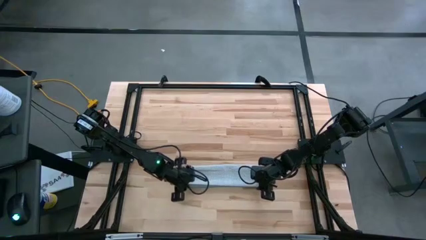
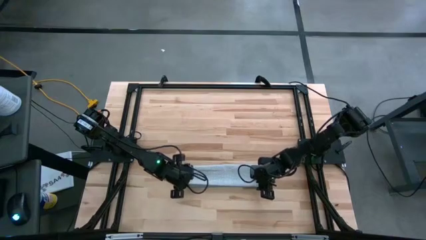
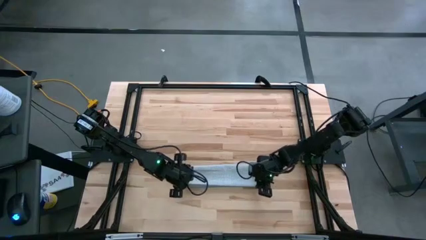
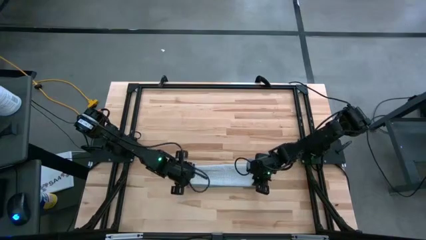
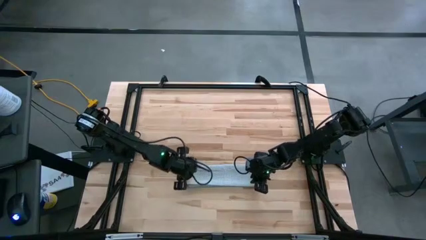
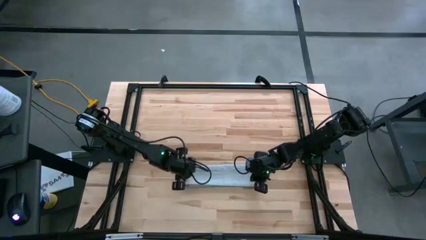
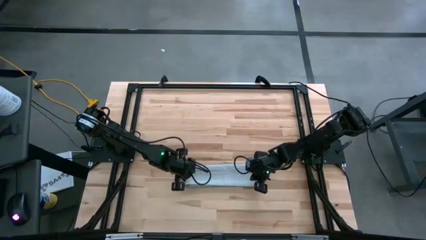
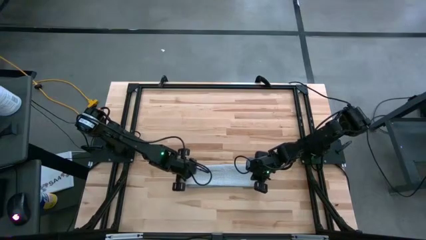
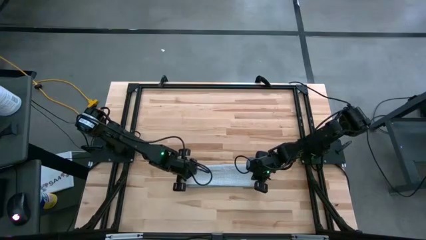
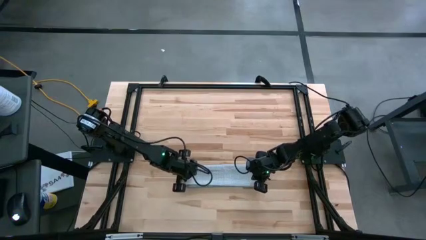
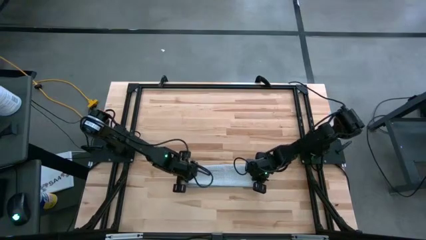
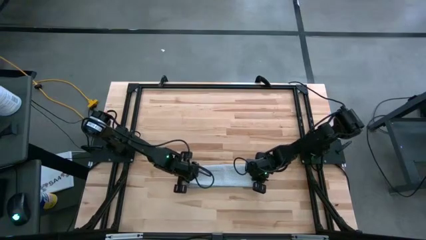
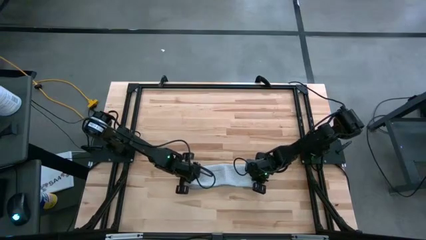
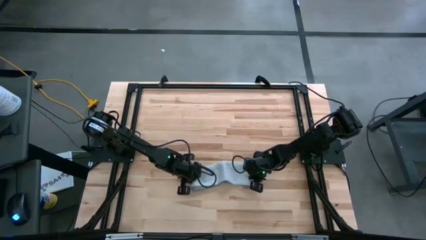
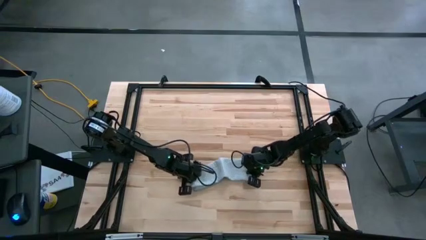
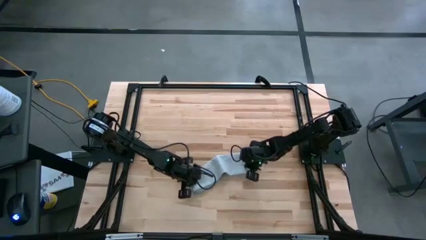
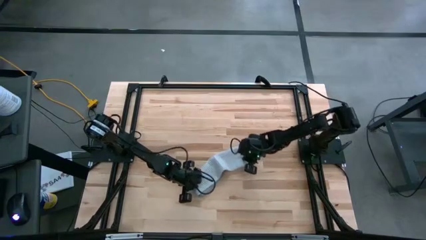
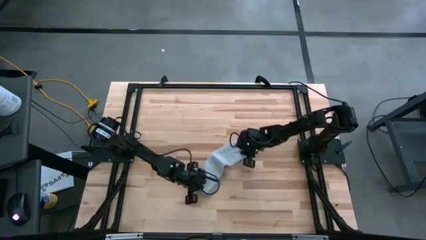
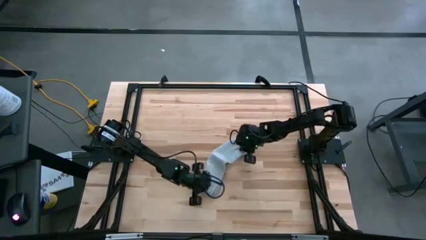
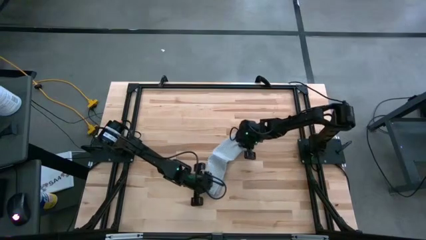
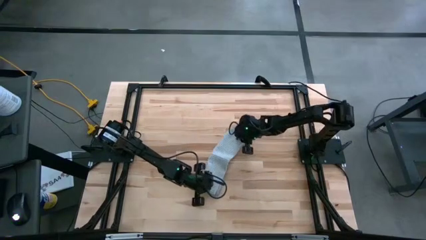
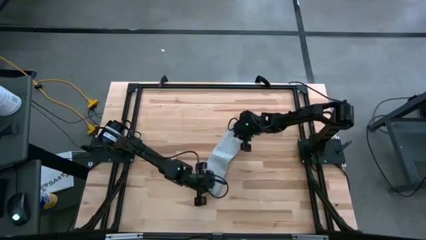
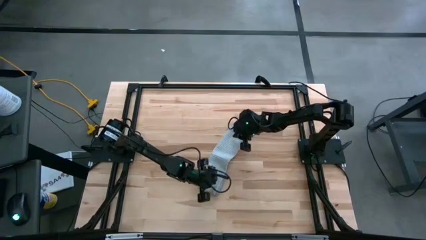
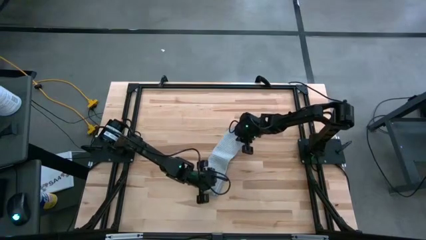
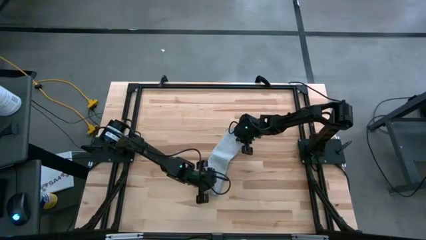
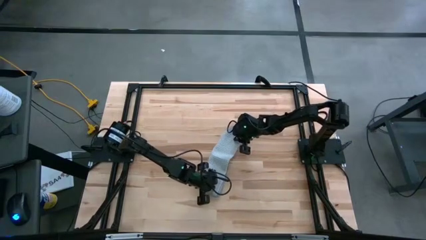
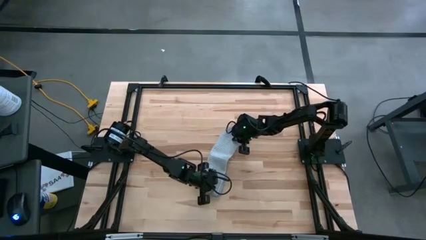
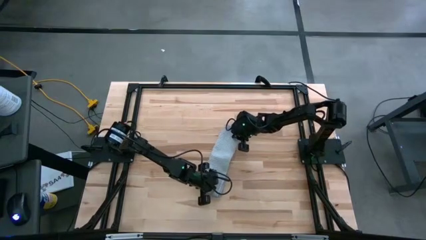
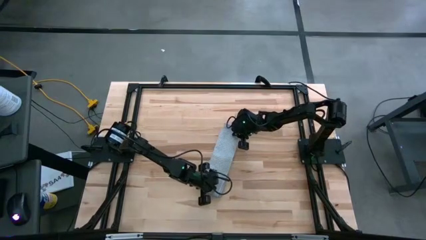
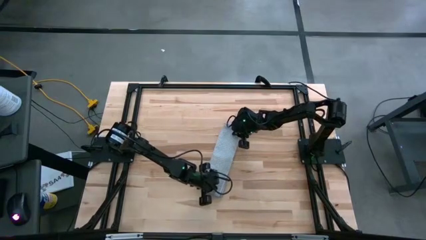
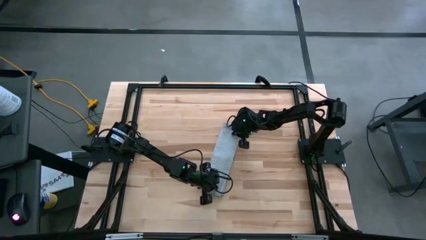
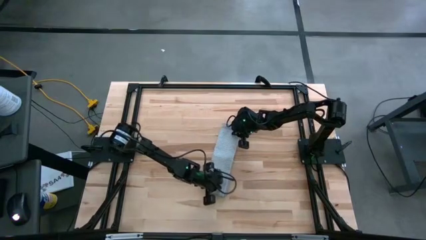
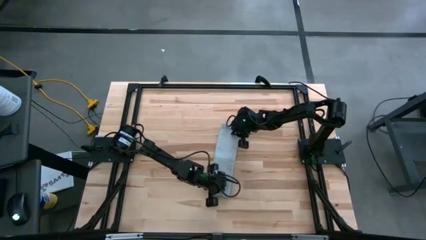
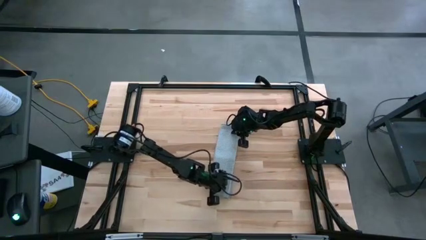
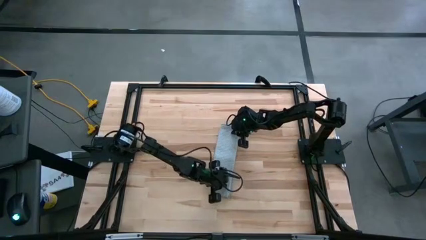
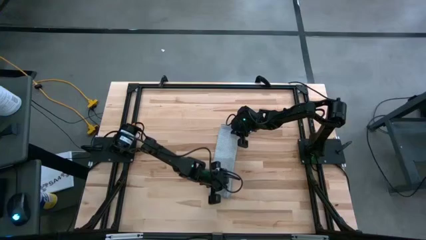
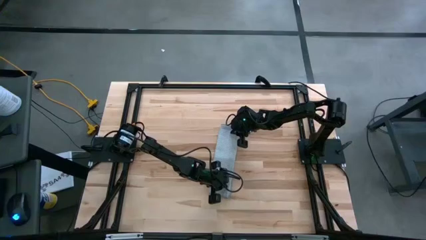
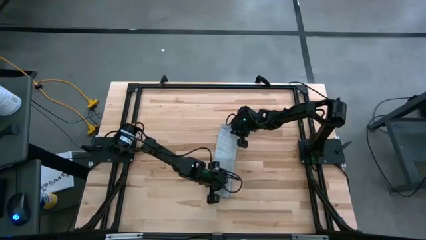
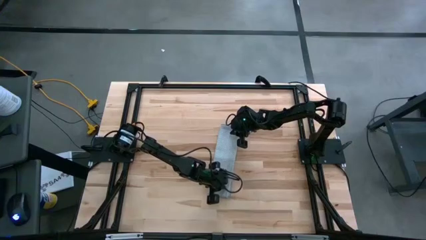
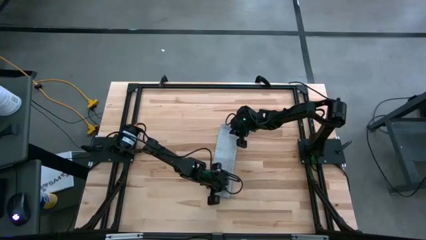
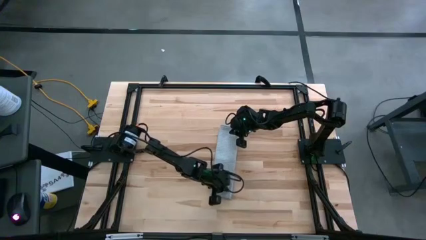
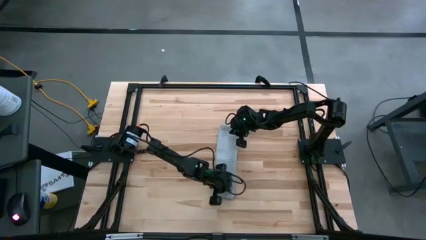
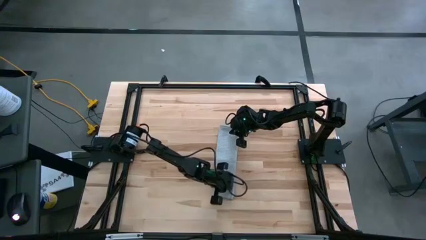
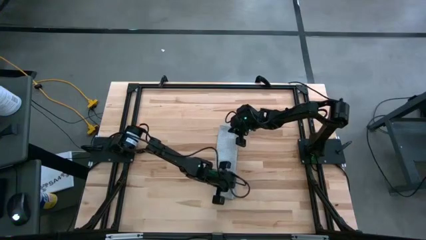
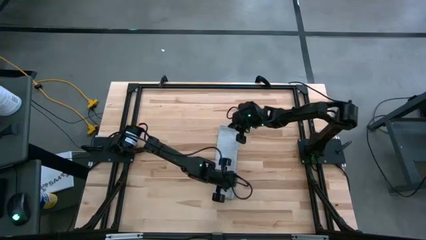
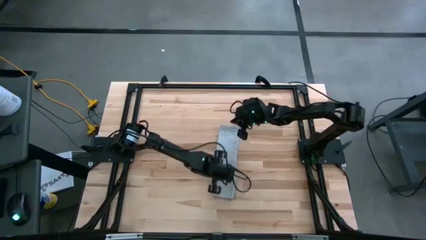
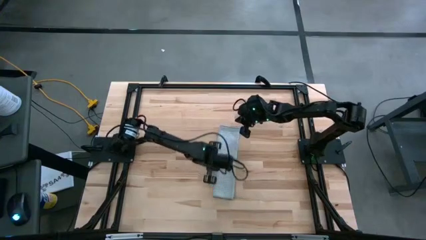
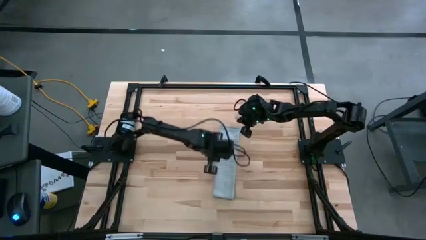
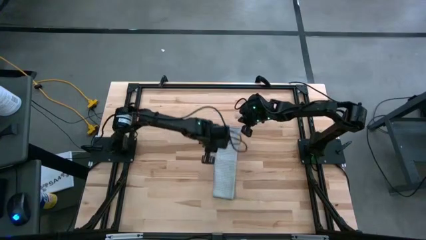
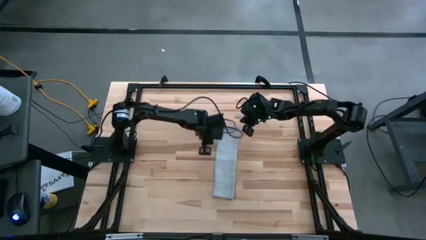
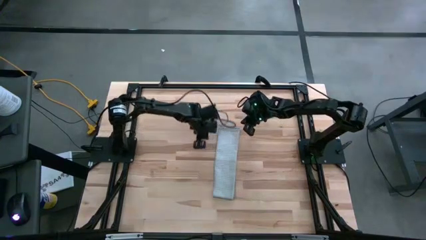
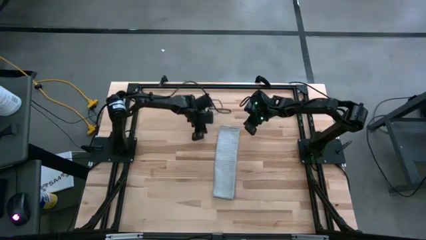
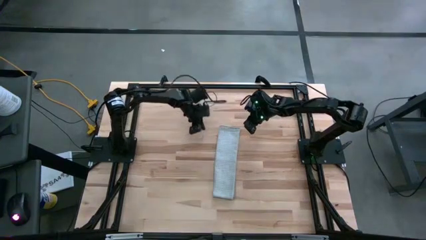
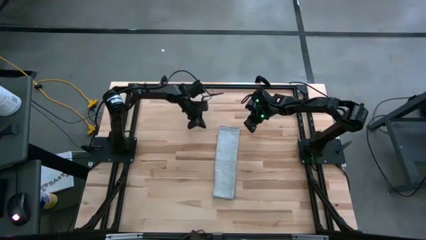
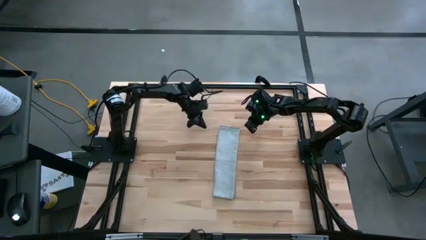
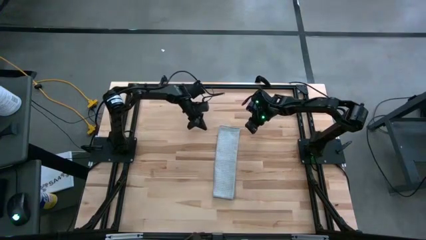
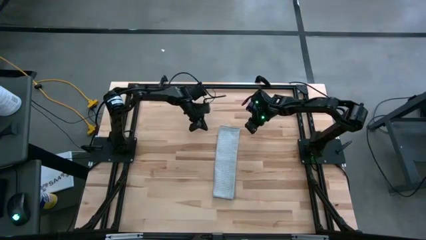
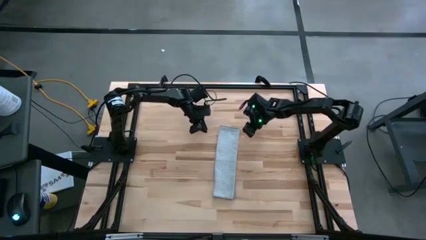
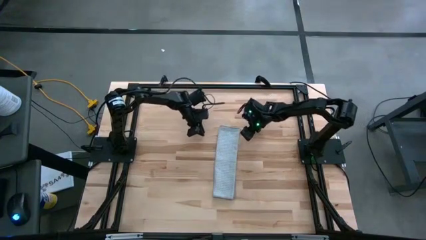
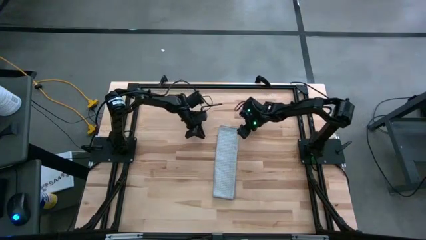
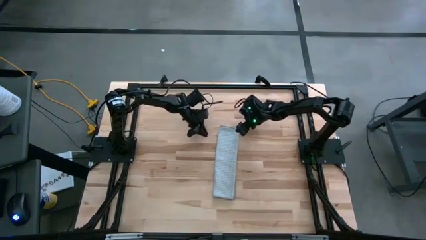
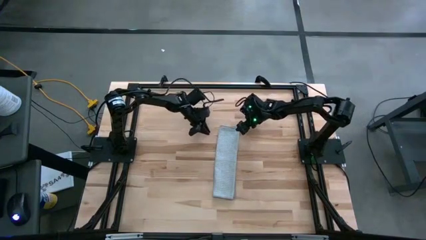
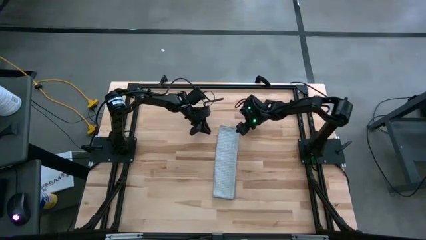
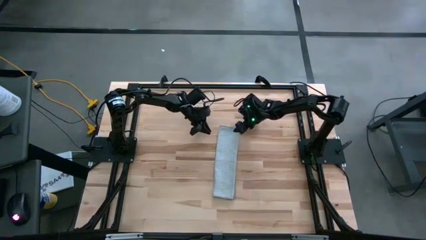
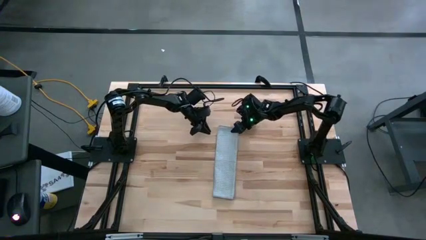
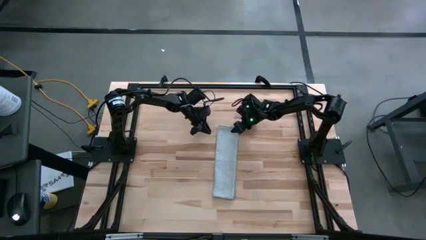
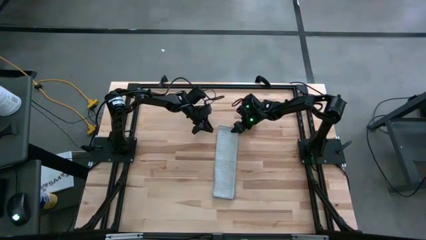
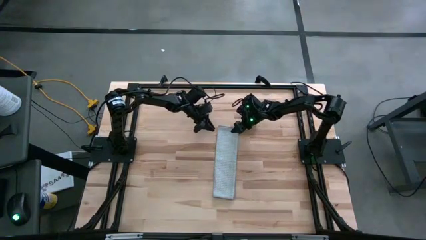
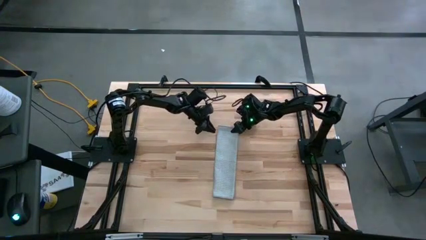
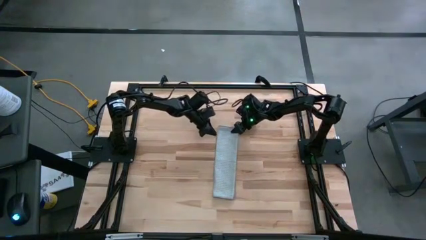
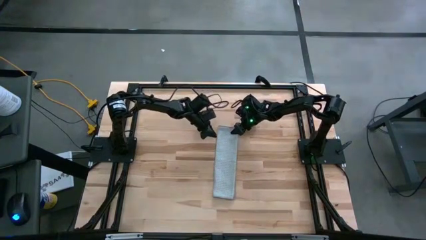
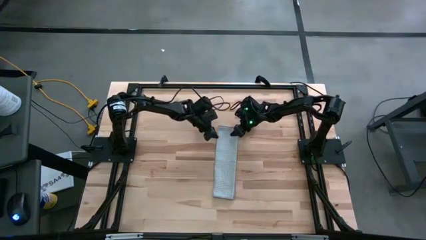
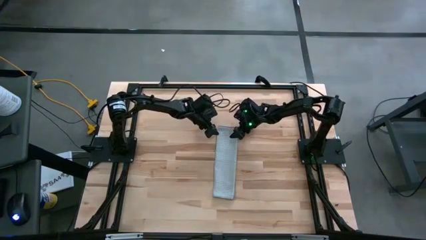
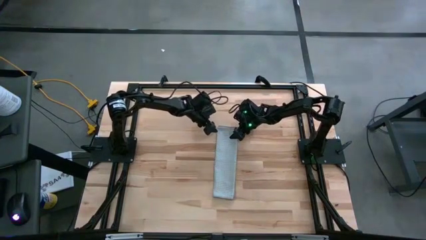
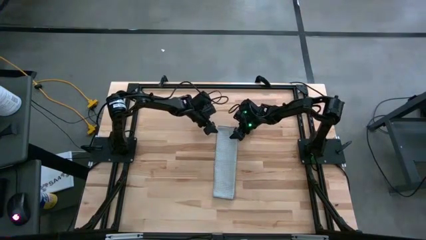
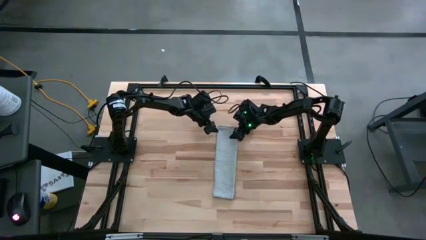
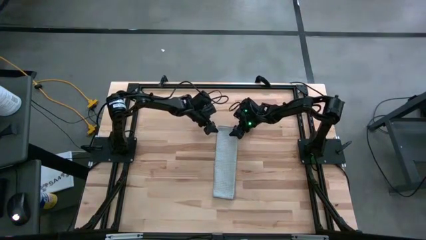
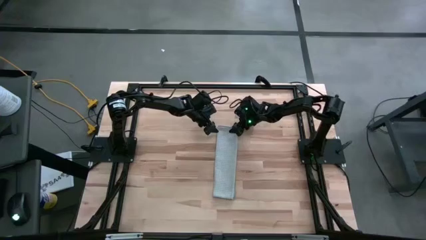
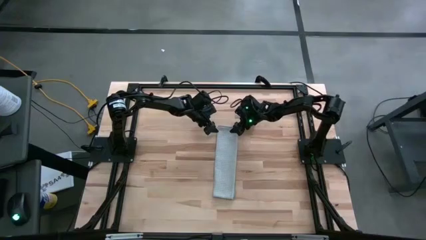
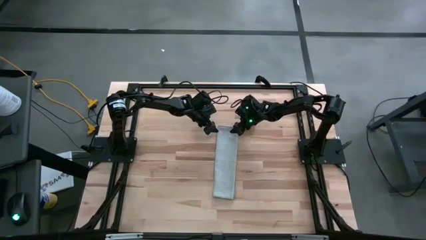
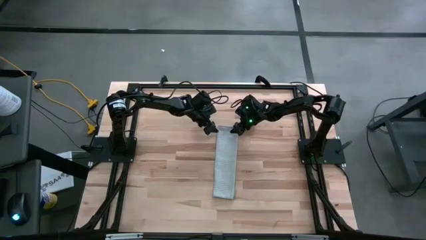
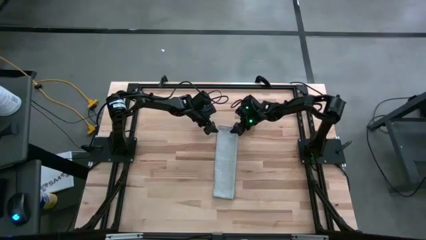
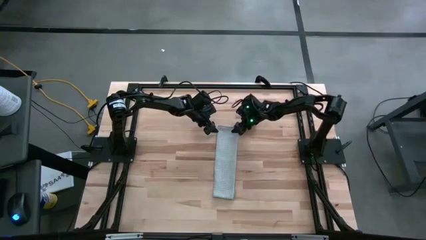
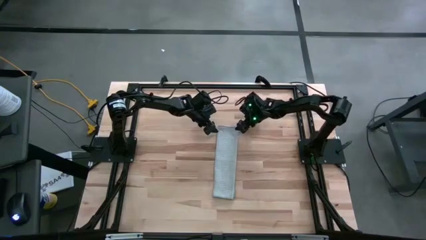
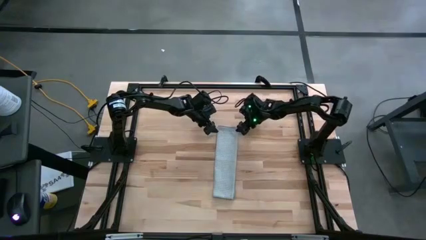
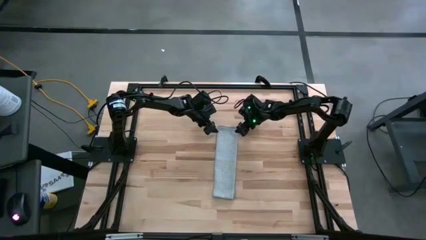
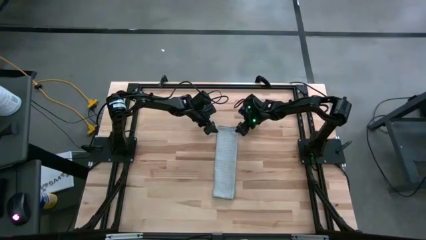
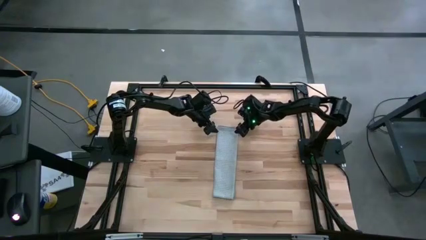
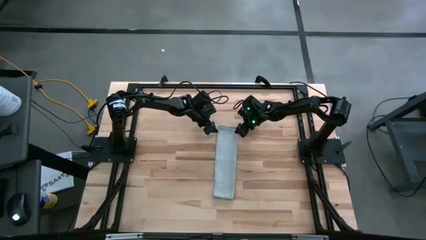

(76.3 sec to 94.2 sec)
Task: Fold microfiber towels
Fold the gray towel on the table
